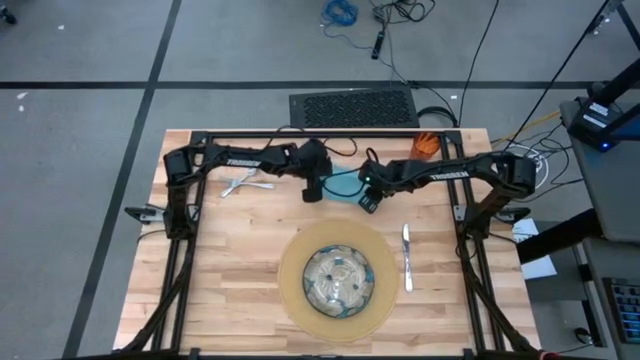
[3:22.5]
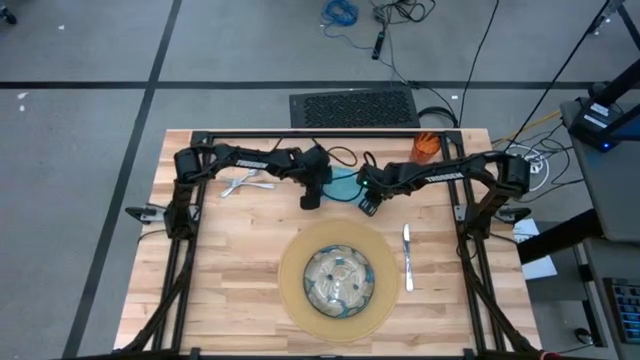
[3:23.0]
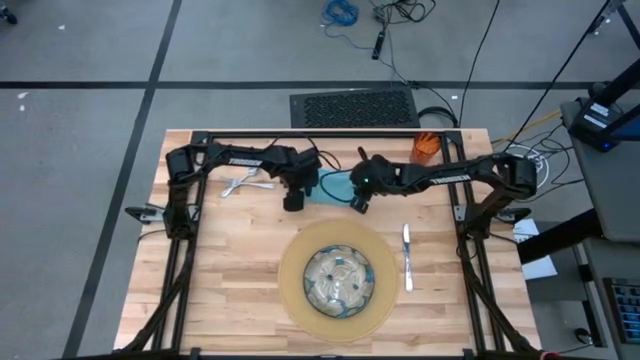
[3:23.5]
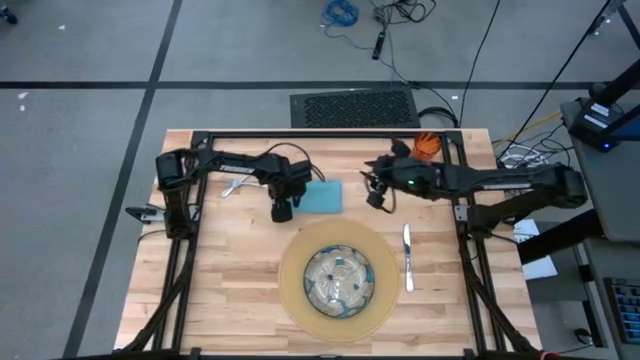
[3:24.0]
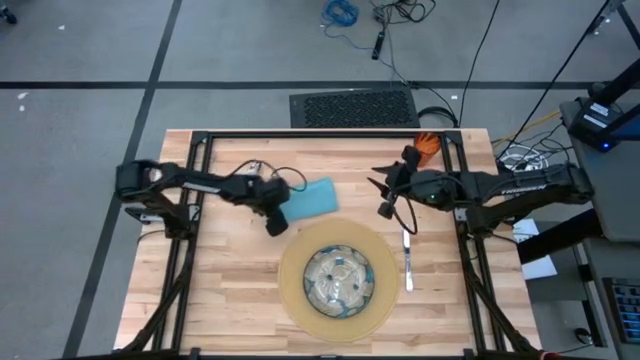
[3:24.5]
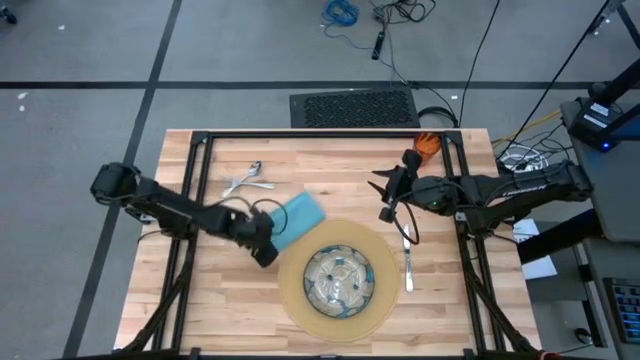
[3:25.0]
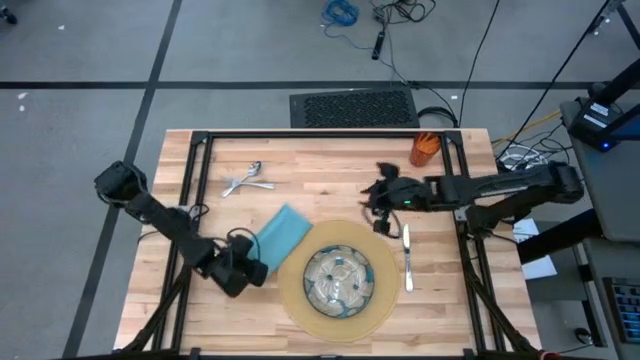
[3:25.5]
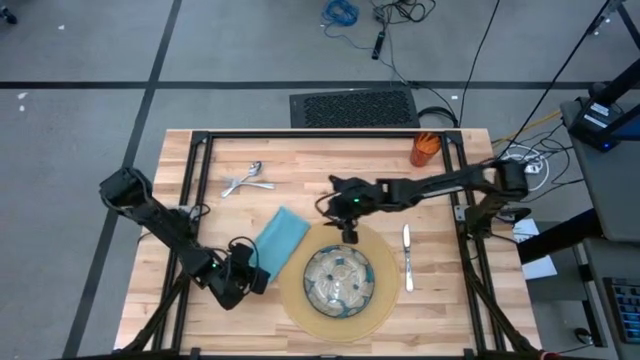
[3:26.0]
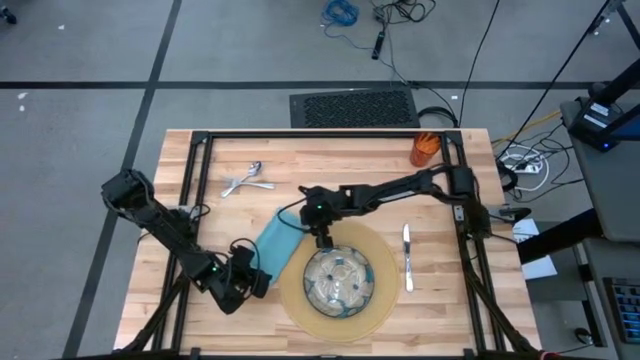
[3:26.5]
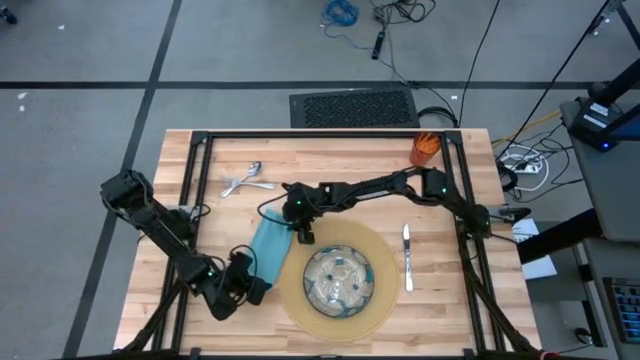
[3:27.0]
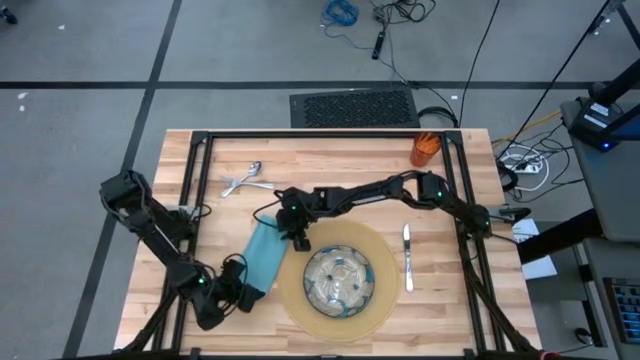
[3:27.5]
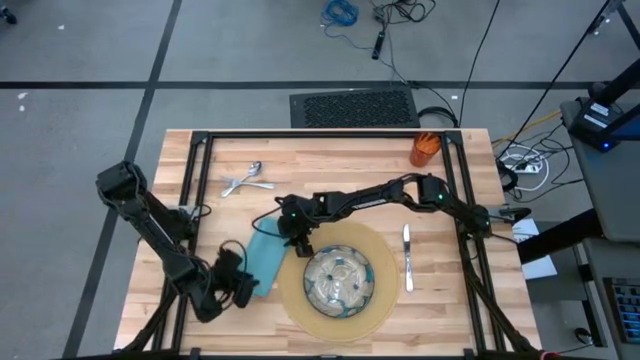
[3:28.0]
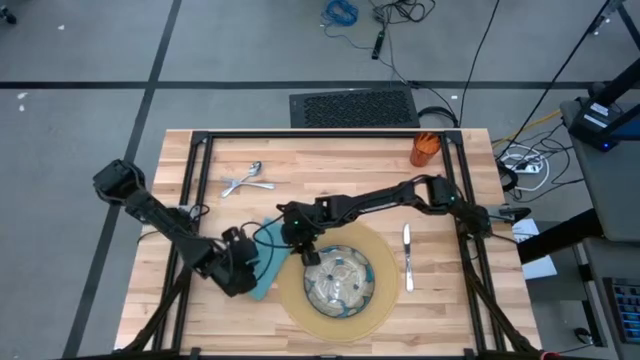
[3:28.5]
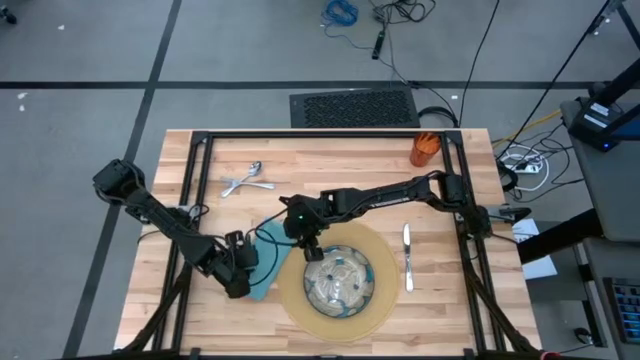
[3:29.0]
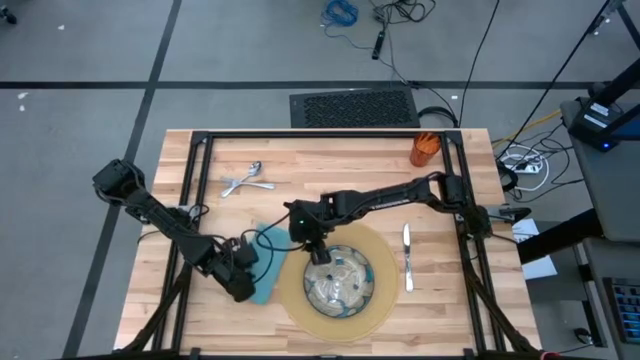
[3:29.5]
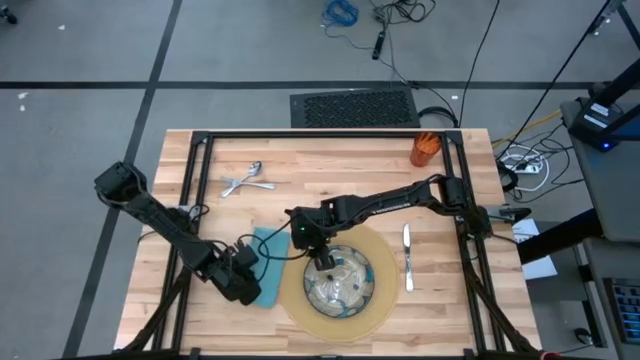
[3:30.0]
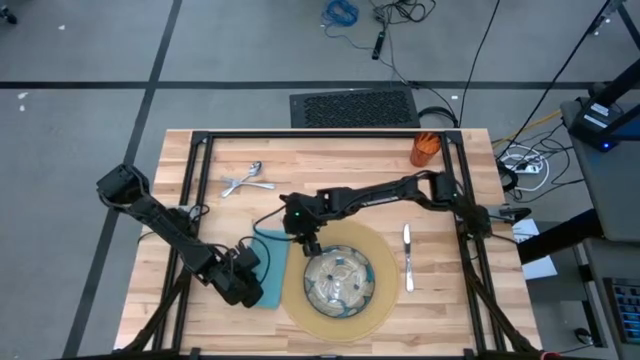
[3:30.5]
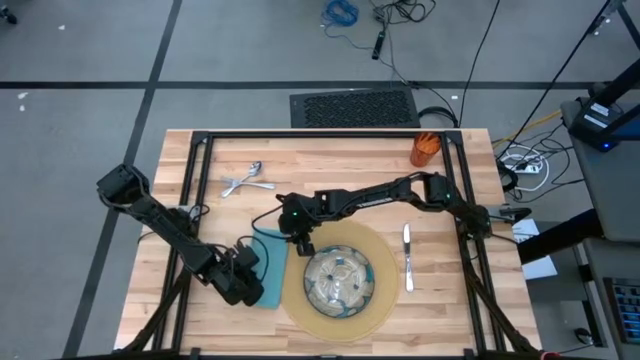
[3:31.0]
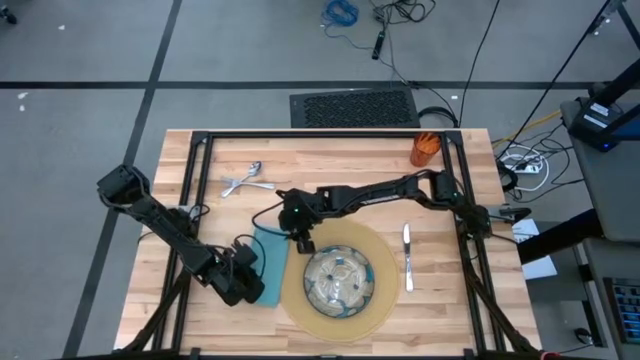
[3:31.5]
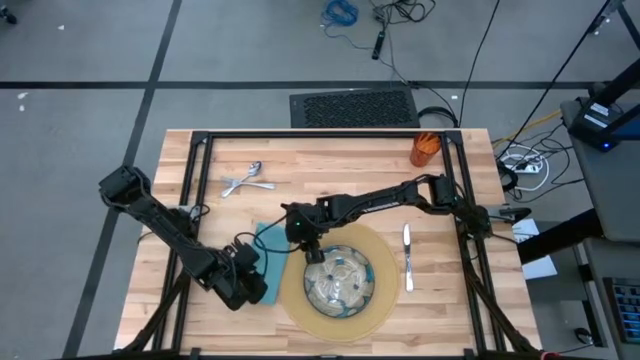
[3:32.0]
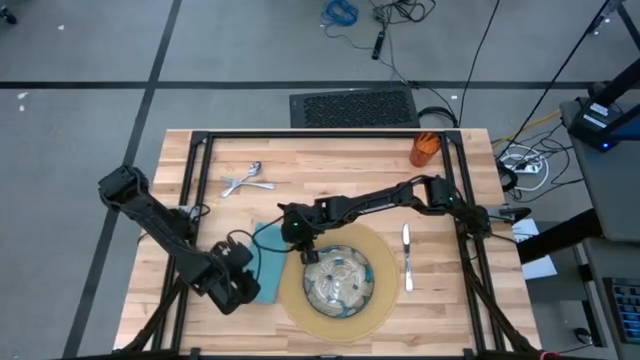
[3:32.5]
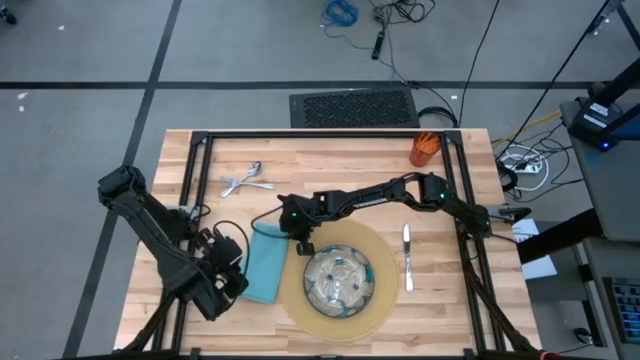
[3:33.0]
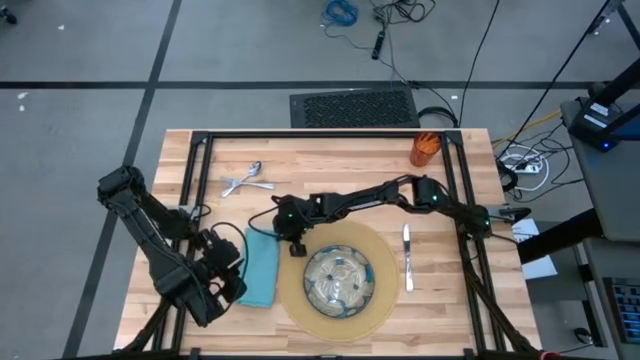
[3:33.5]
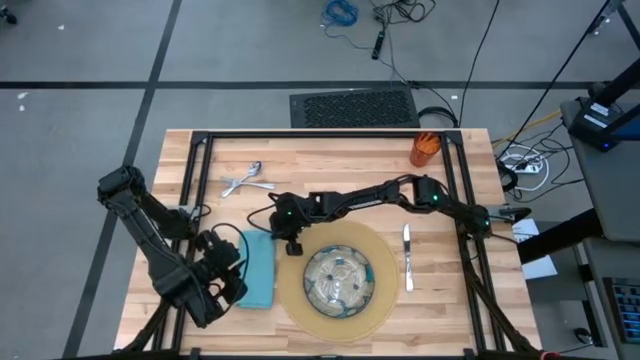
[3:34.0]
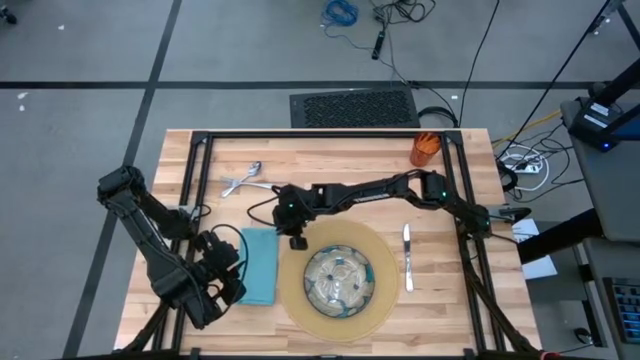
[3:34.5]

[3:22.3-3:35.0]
Task: Set table place
Move the blue napkin beside the brown placemat

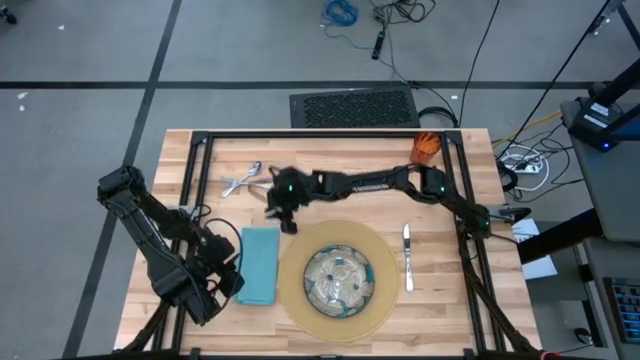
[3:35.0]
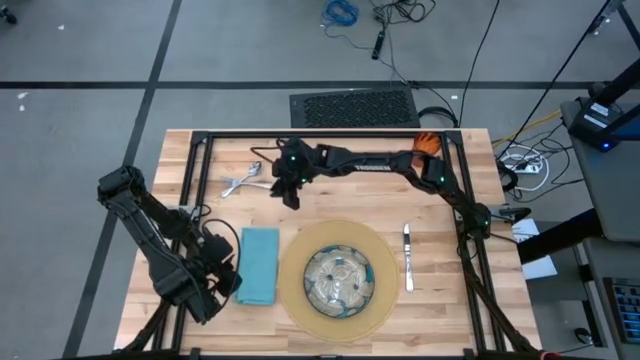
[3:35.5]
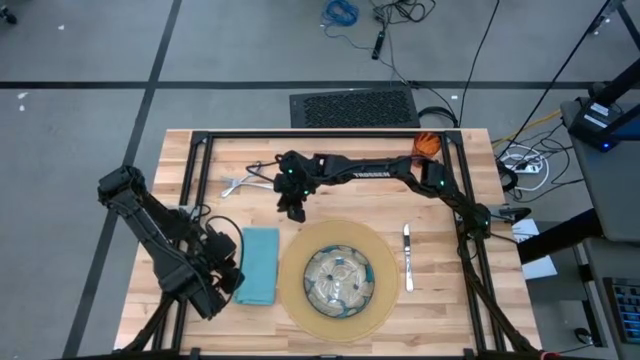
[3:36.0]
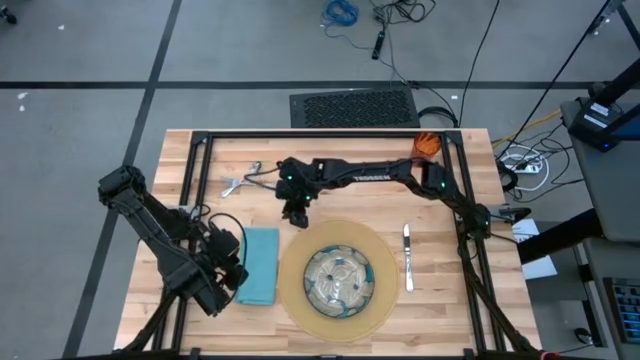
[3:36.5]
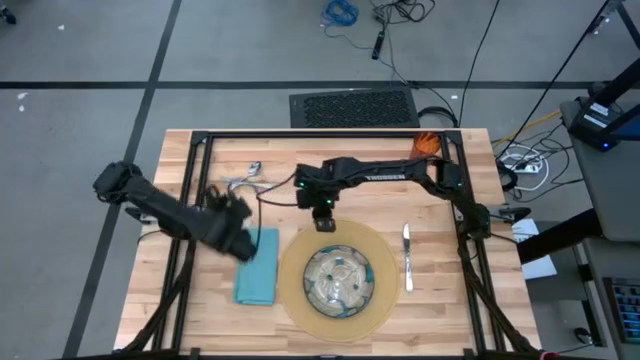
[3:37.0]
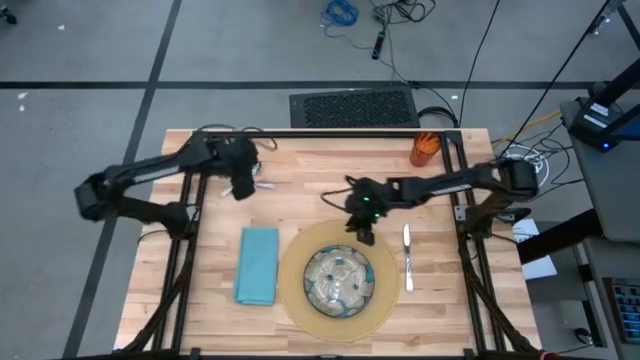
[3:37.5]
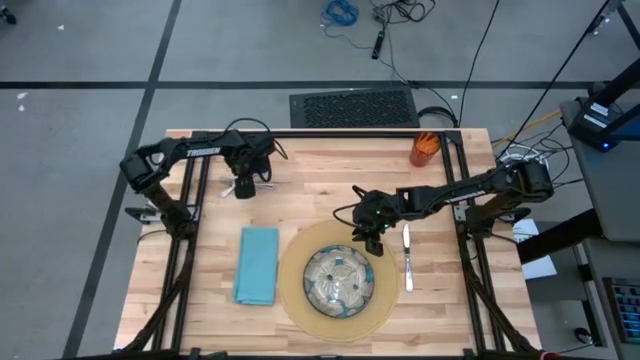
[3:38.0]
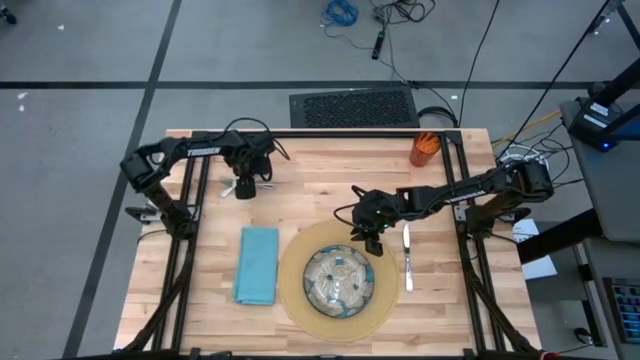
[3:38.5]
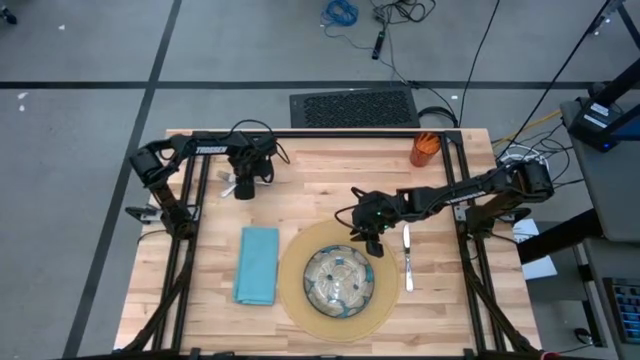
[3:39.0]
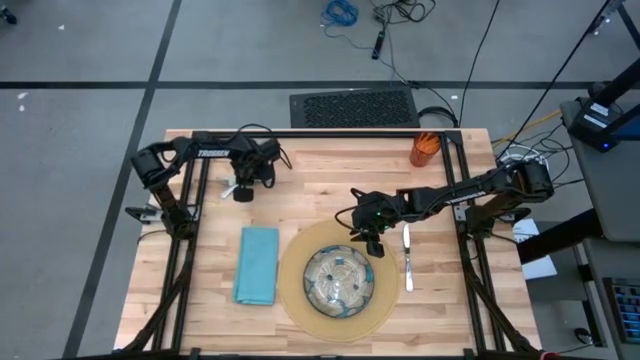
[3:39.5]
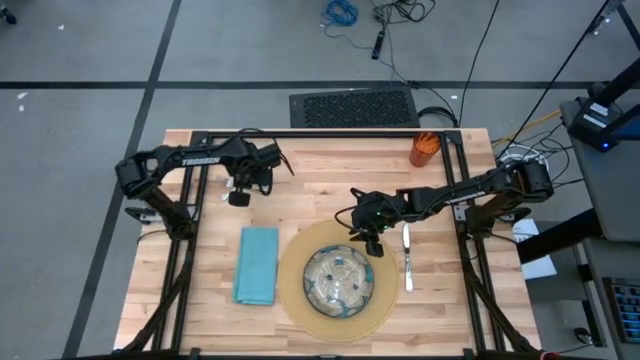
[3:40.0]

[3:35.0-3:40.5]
Put the silver fork on the blue napkin on the table

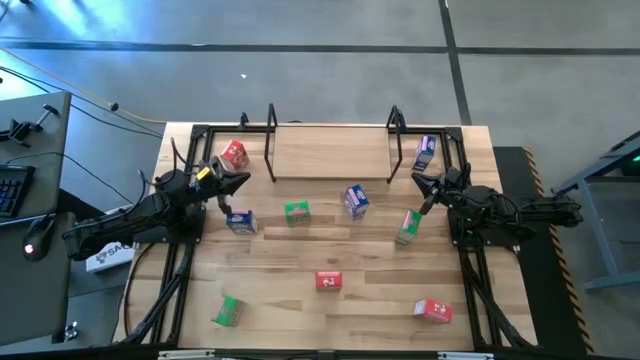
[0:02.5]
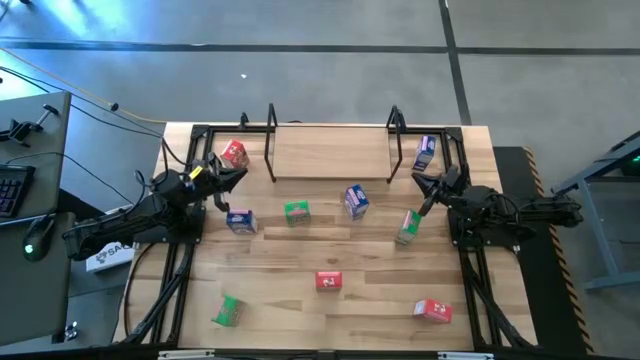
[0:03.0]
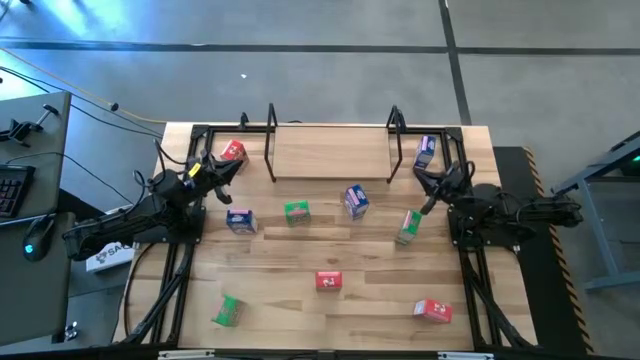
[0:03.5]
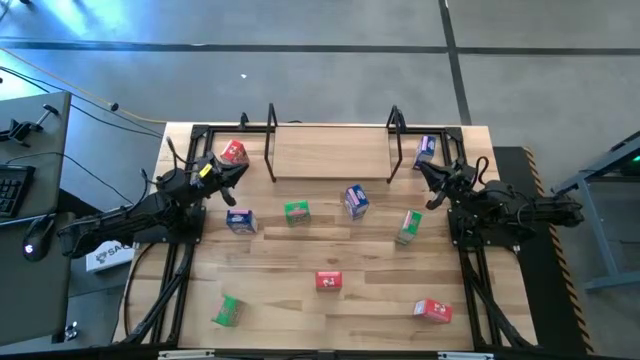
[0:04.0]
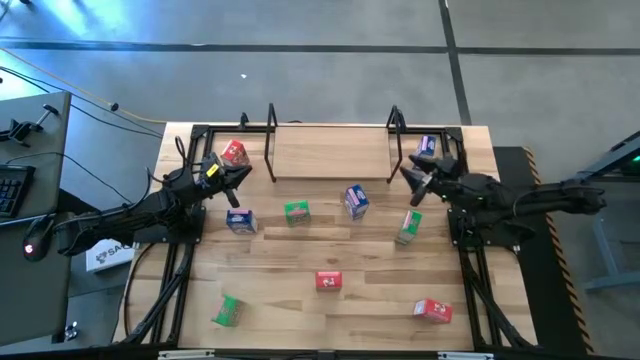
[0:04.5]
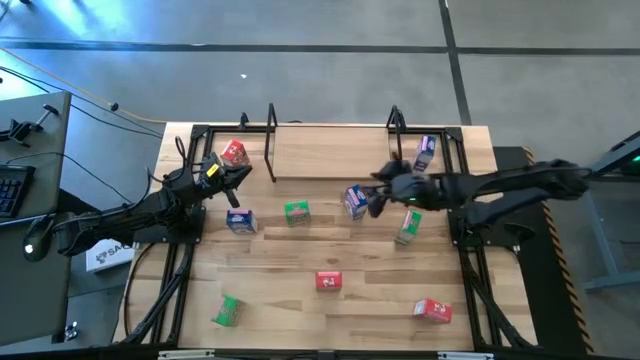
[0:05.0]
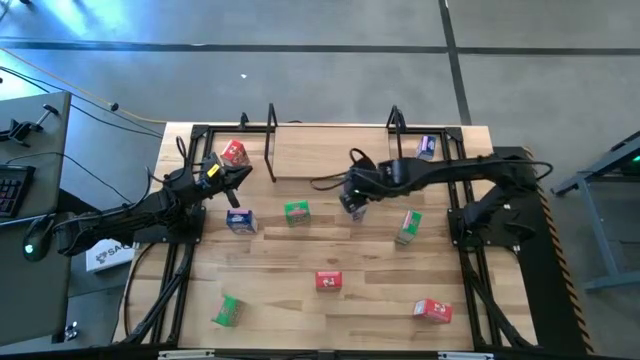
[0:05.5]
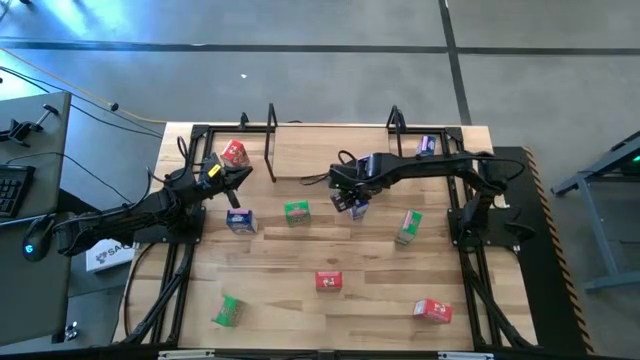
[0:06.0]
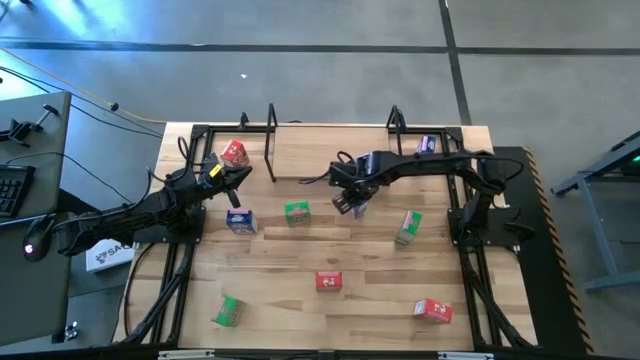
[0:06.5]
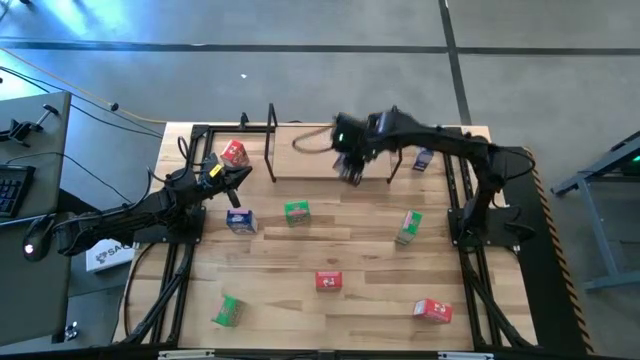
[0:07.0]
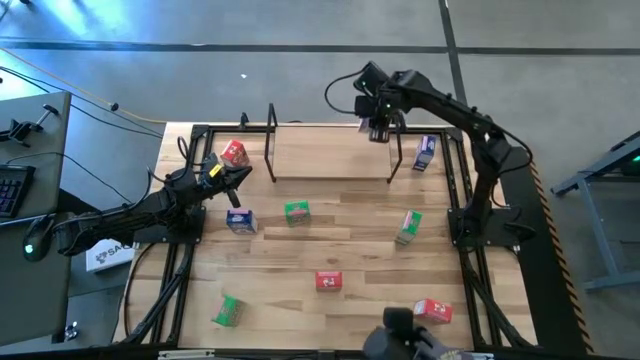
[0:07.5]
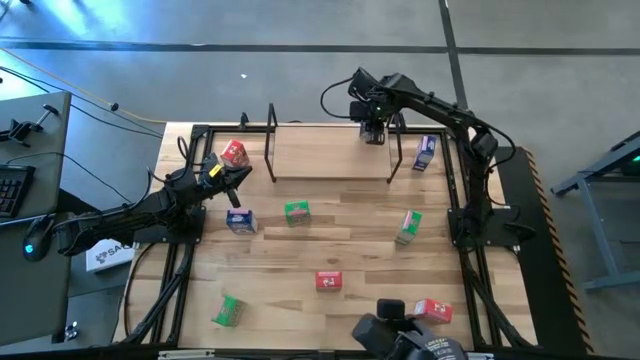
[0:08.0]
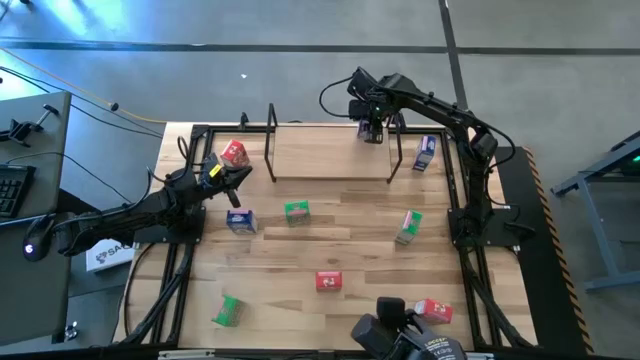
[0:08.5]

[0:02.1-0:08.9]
Task: Stack cereal on shelf
Put the bottom right blue cereal box on the shelf
